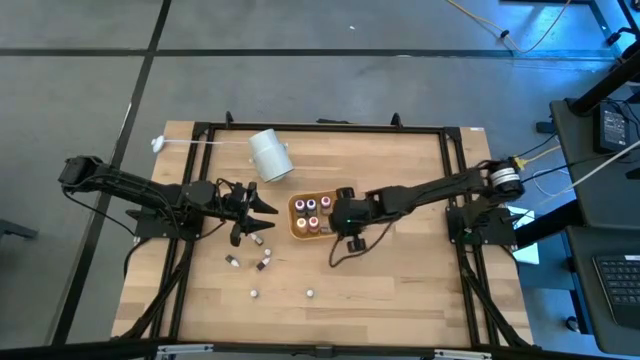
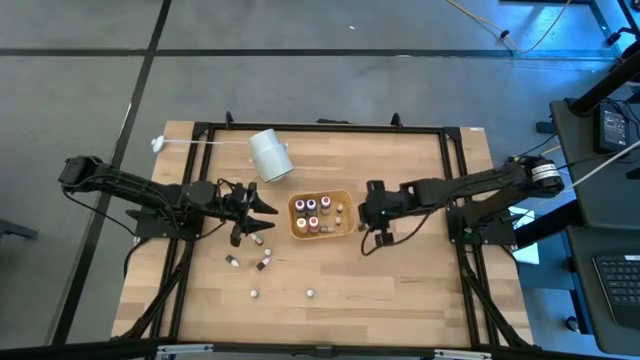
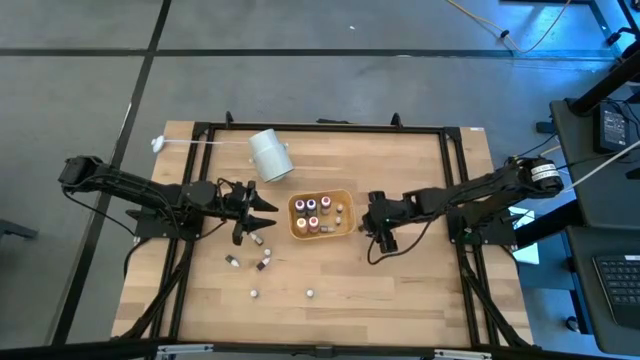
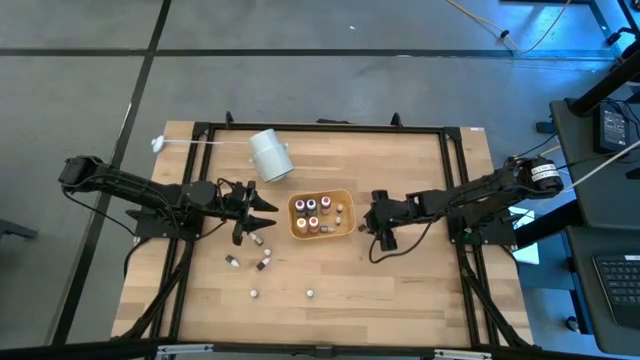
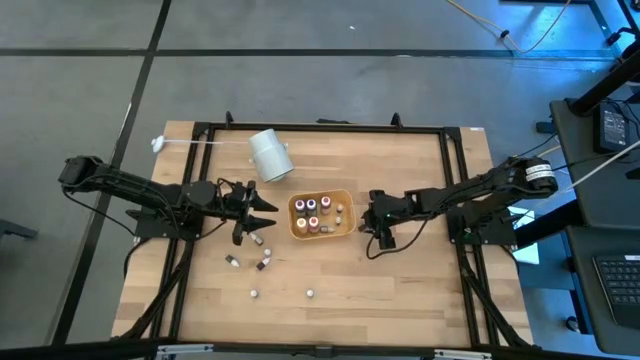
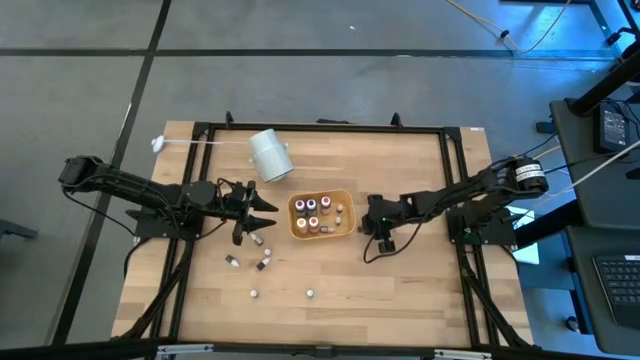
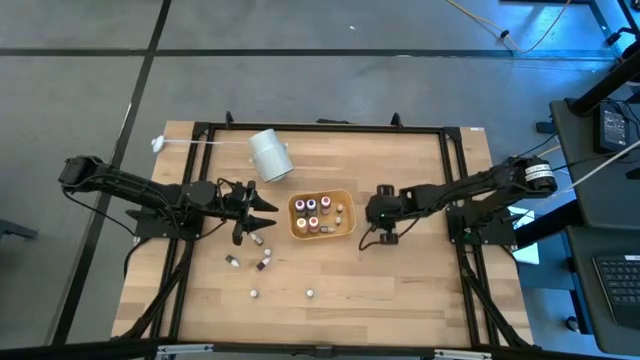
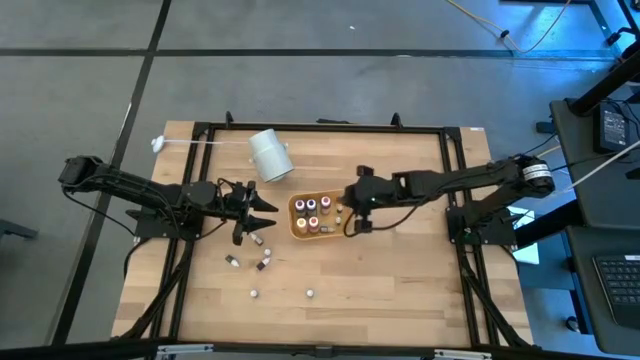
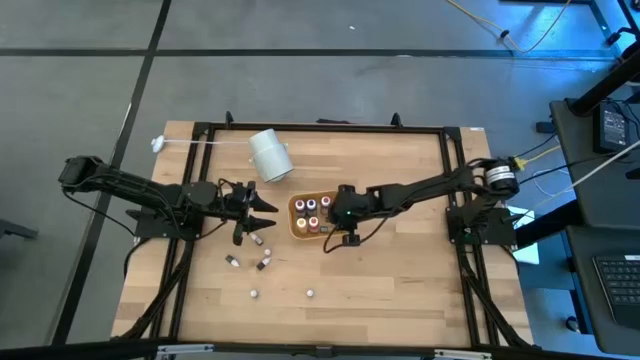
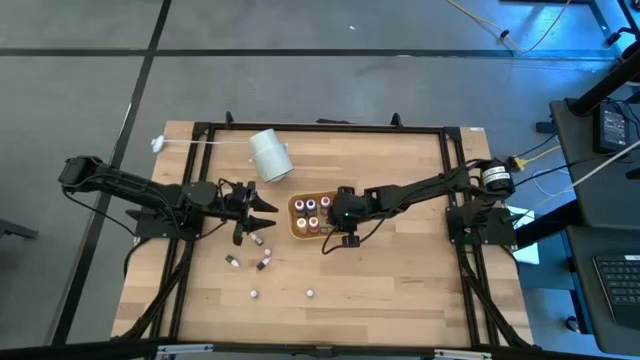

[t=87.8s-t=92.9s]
Task: Pick & Place food coloring
Put the small black ink bottle into the yellow bin

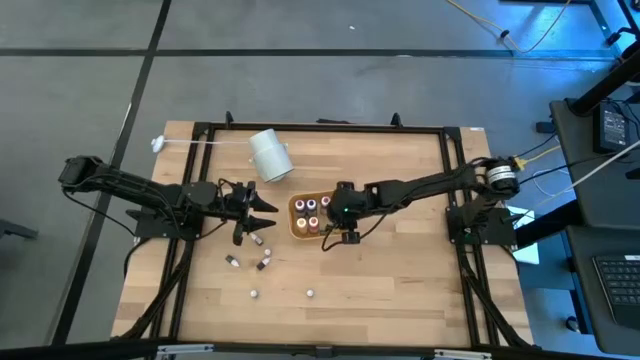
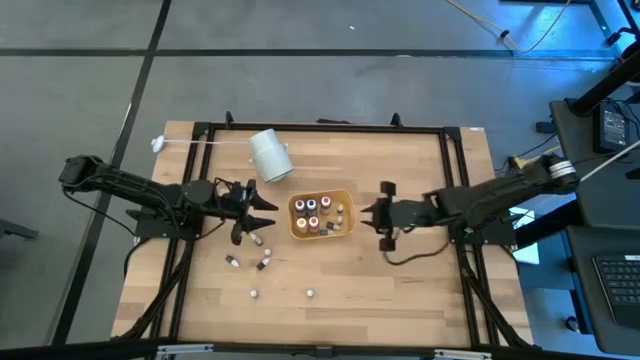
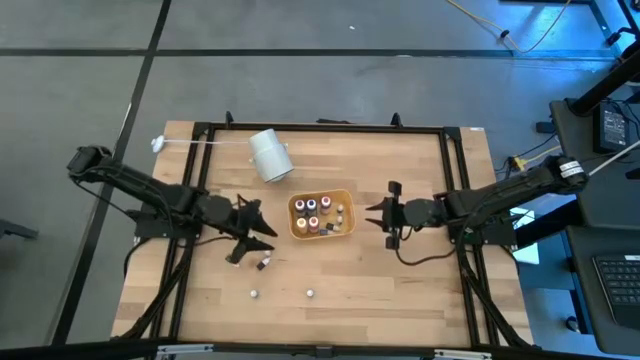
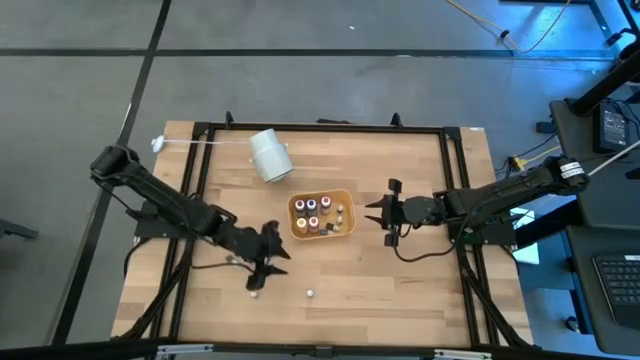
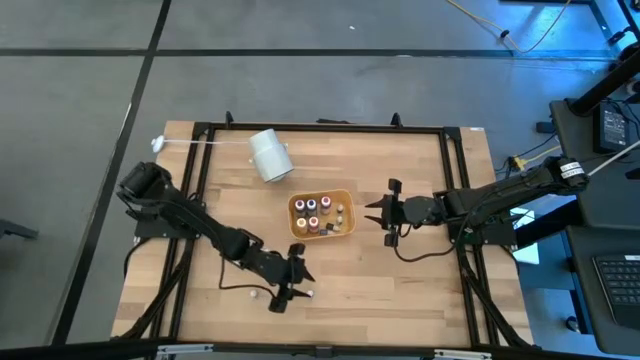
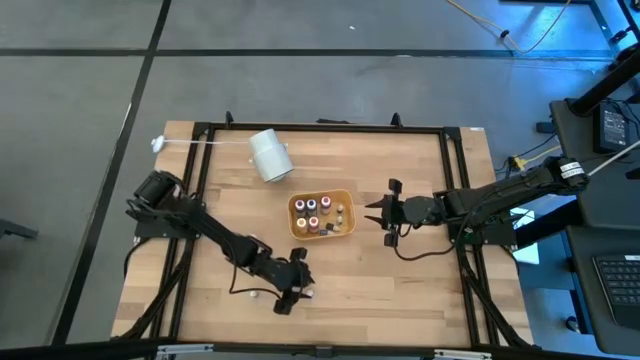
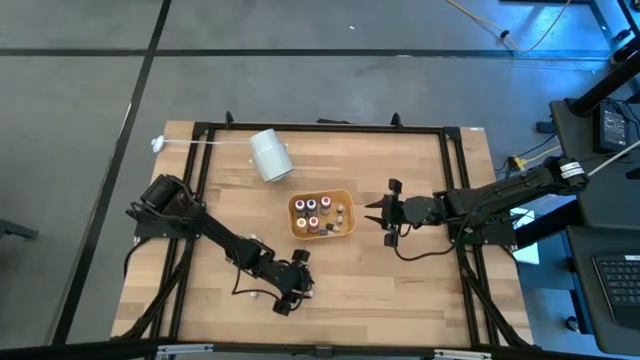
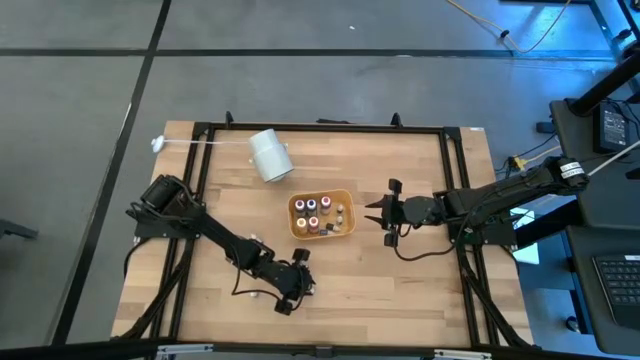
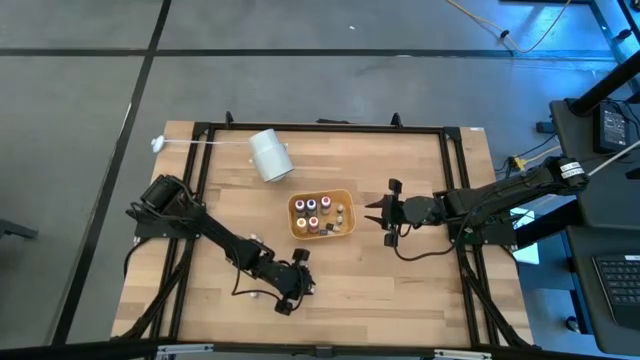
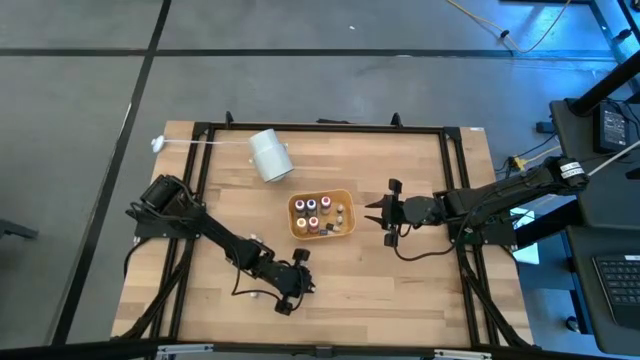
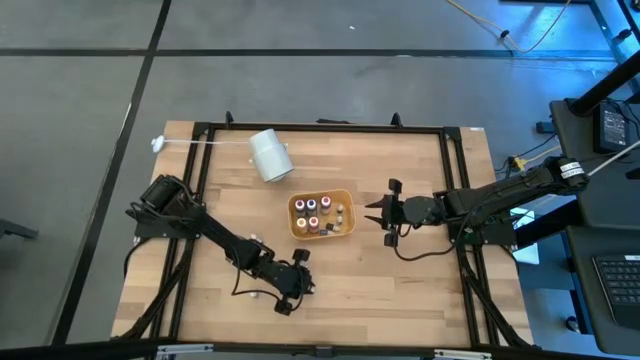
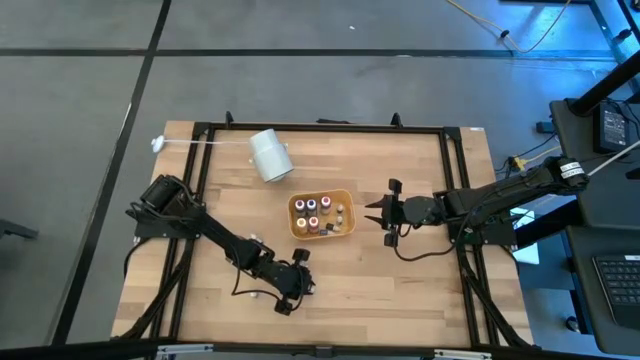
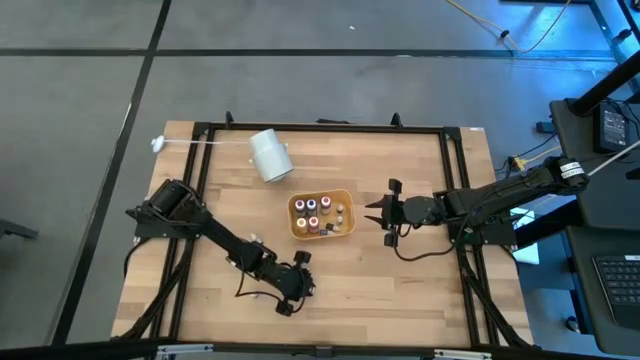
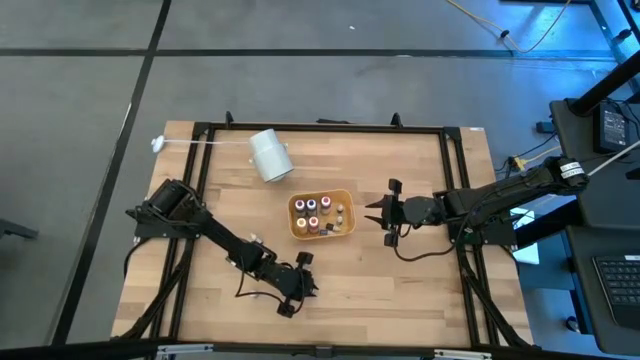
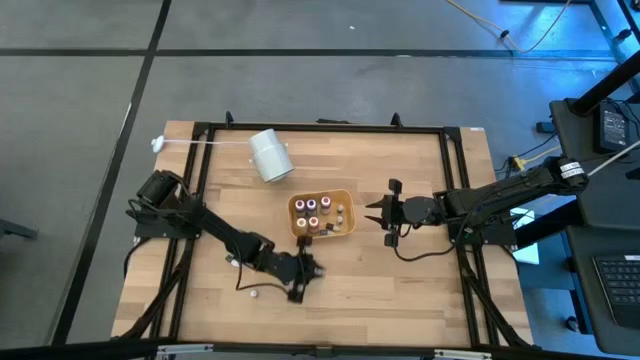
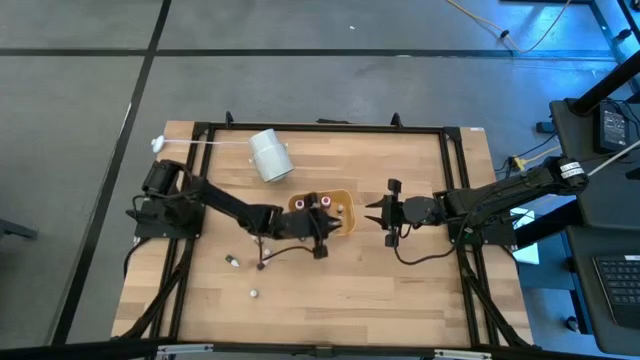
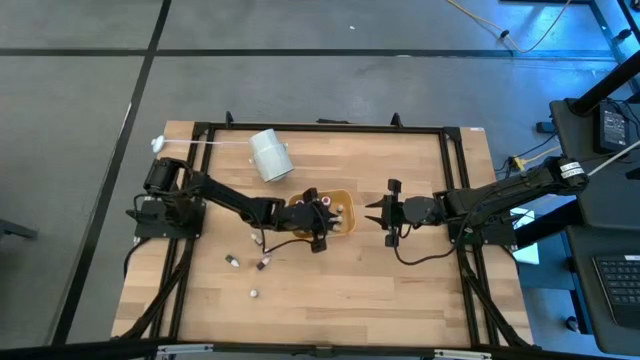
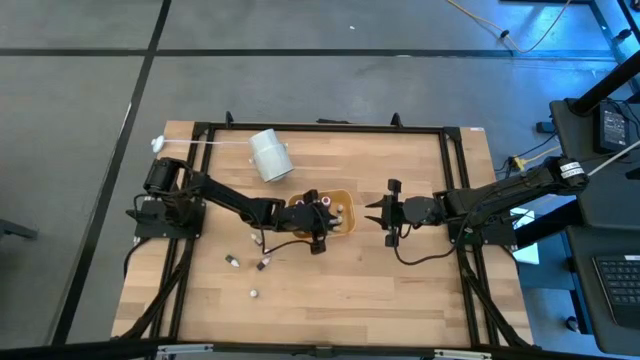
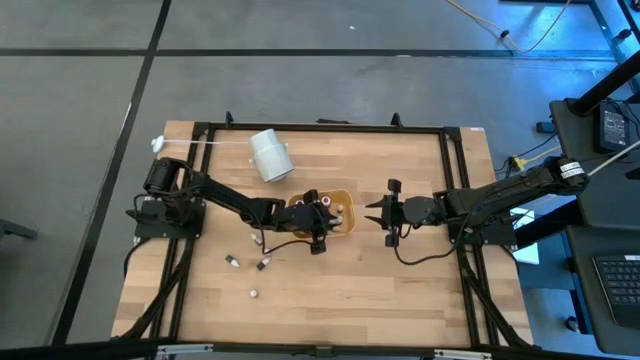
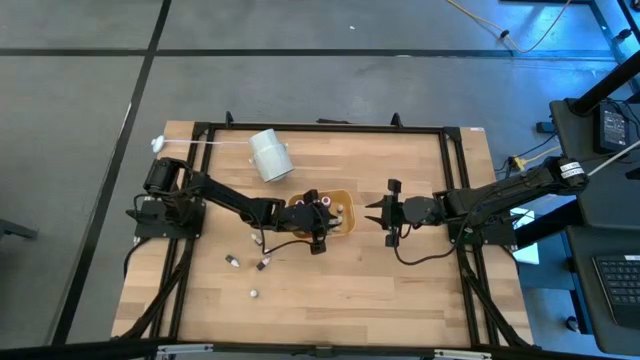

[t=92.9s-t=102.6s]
Put the small black ink bottle into the yellow bin

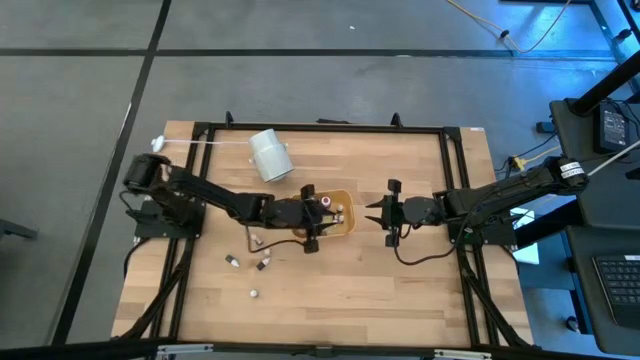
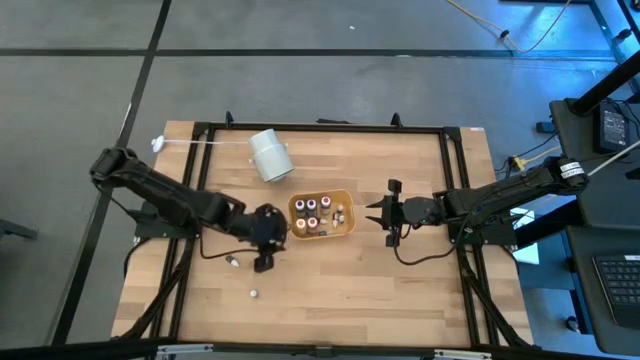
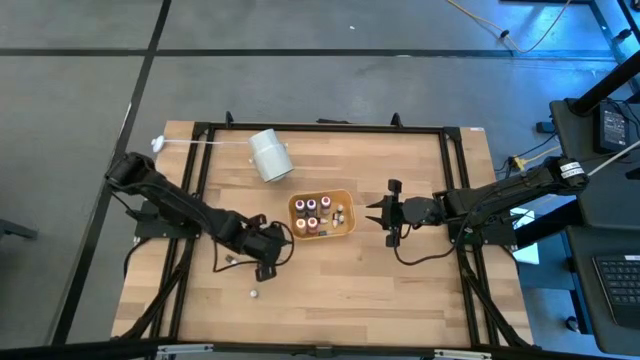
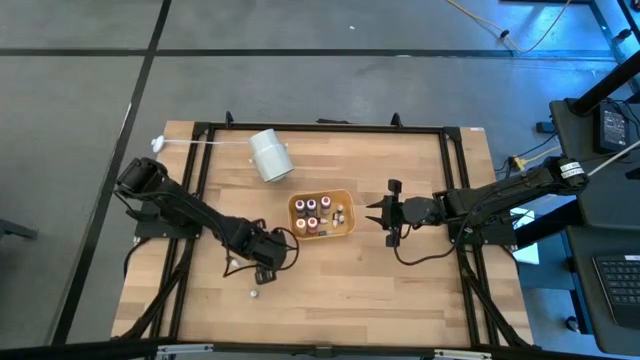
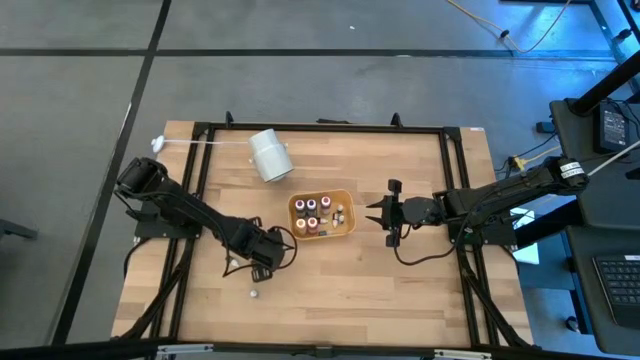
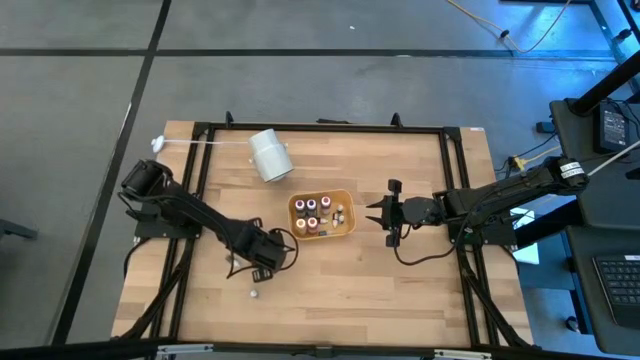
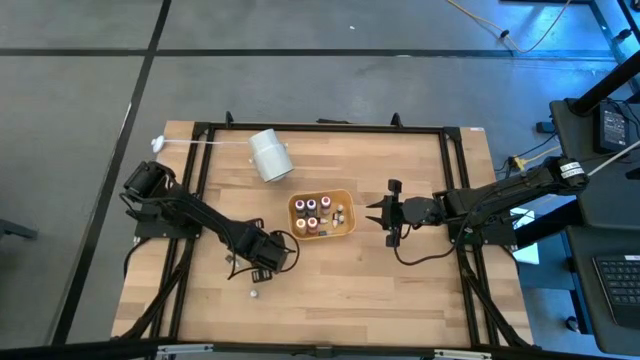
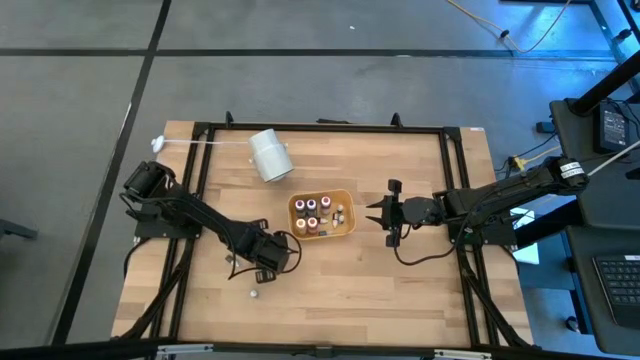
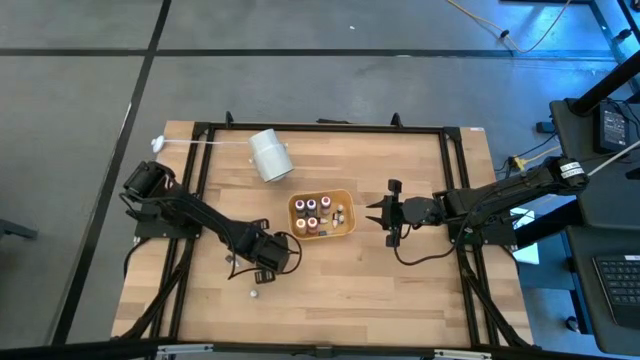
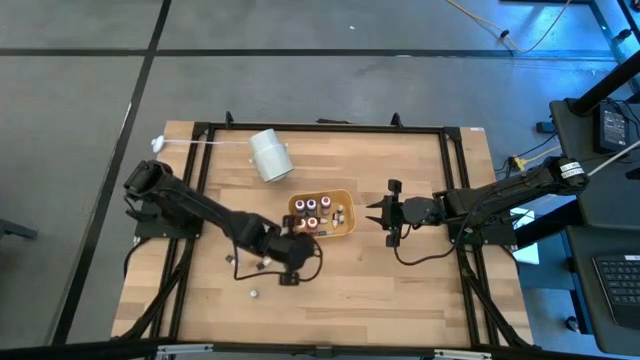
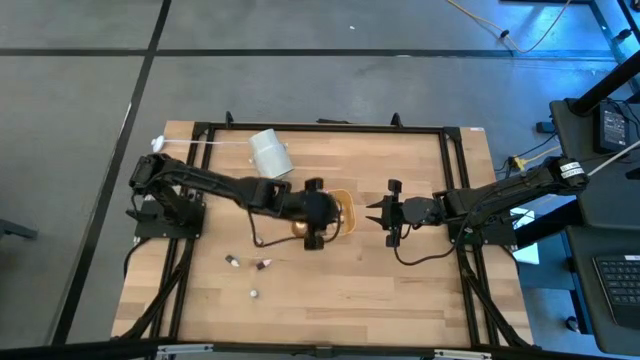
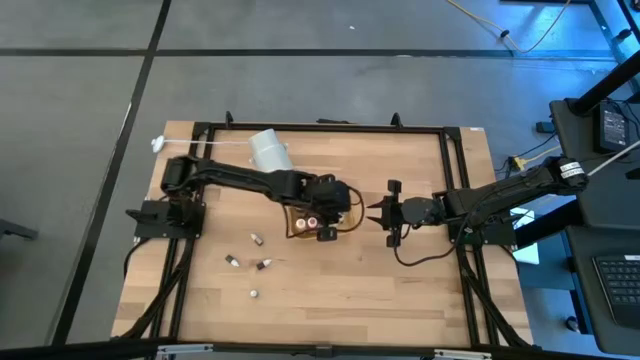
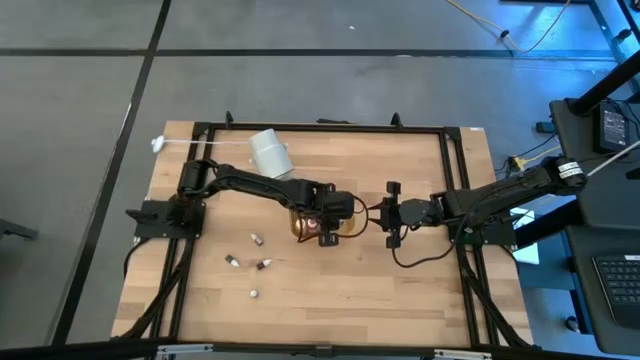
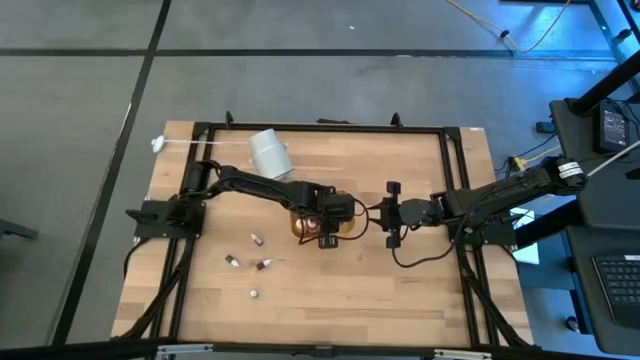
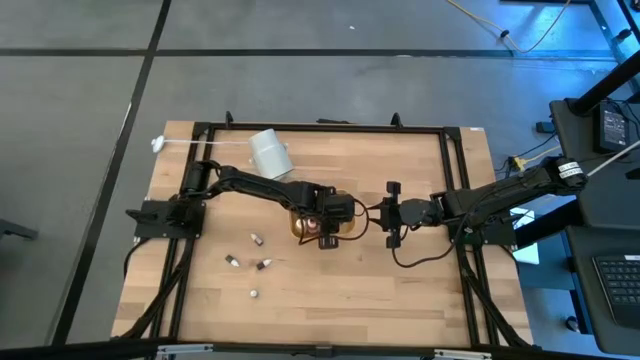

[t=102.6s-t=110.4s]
Put the small black ink bottle into the yellow bin
